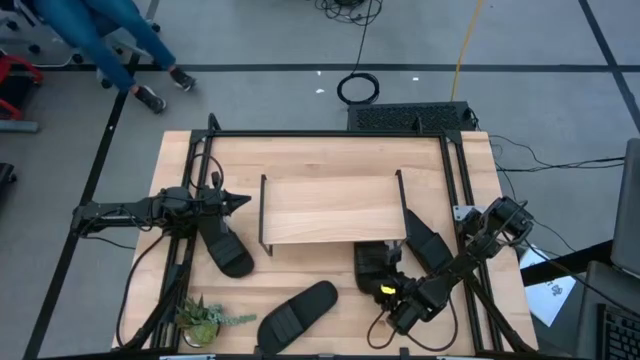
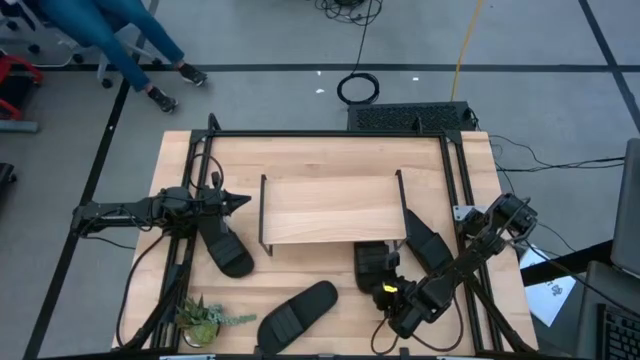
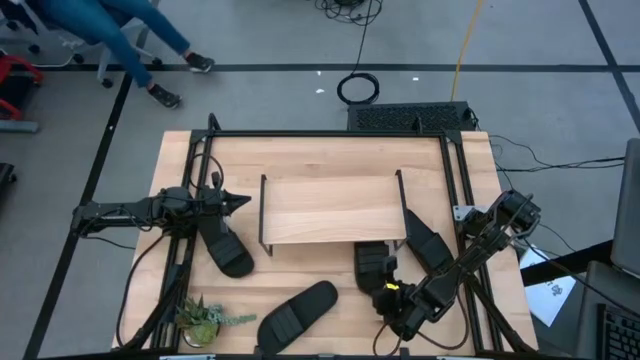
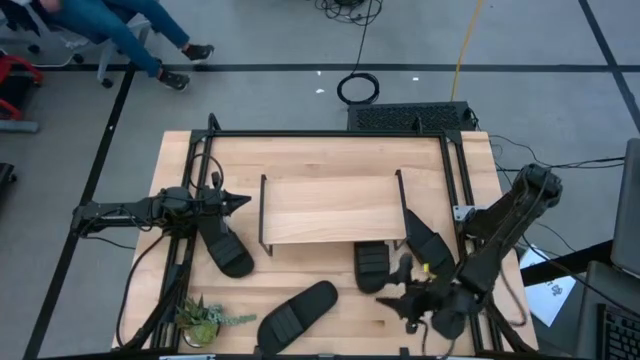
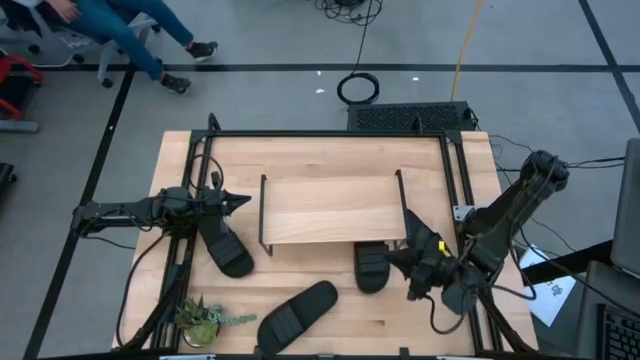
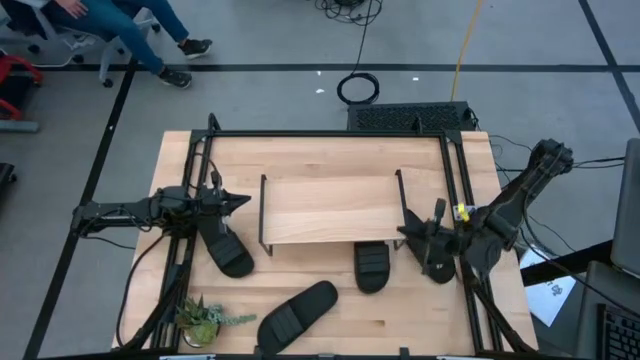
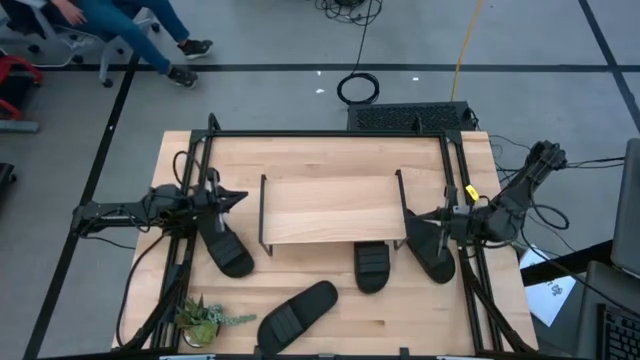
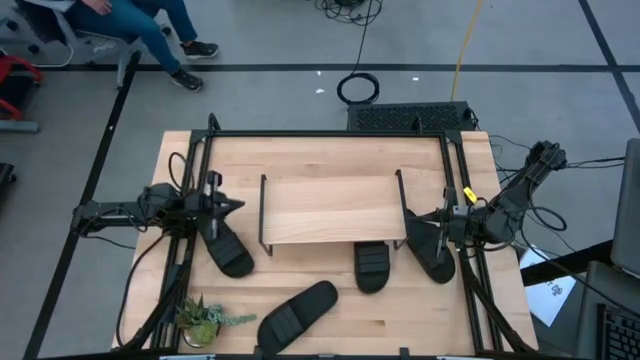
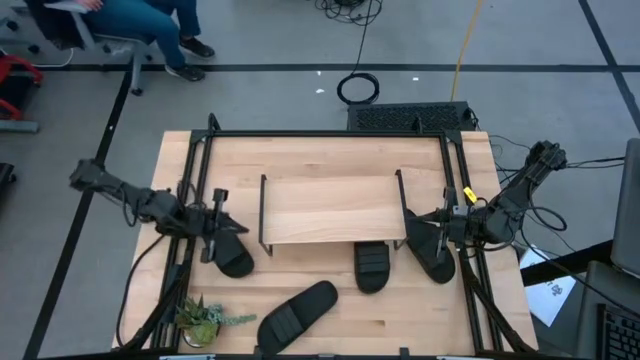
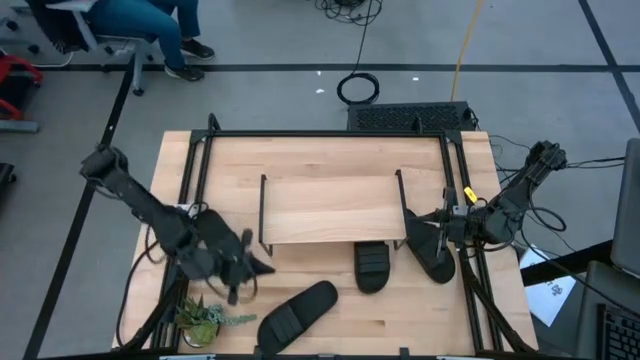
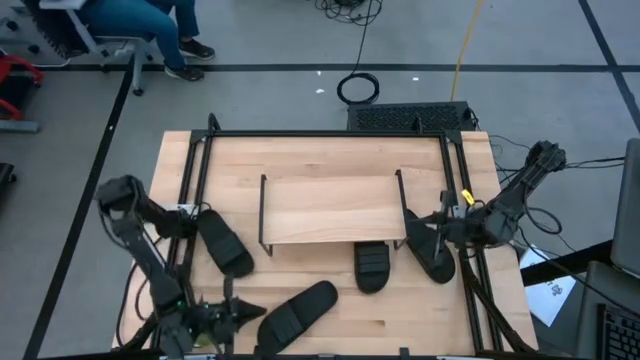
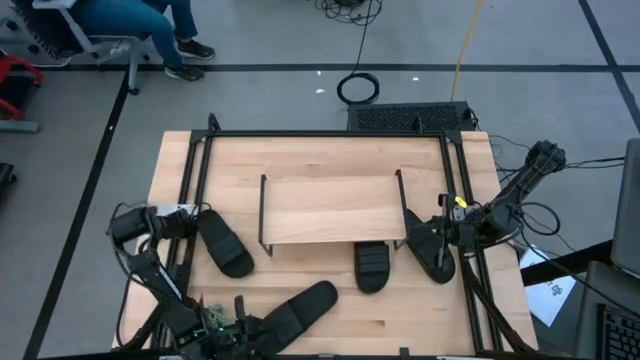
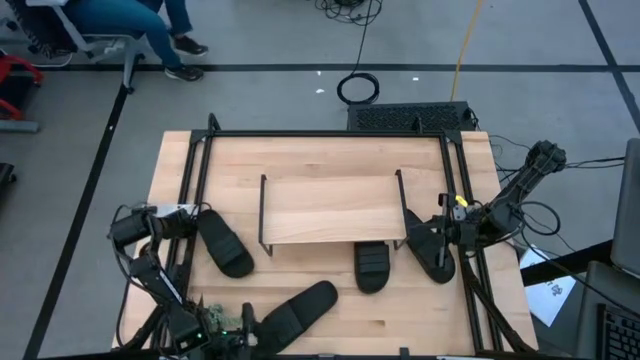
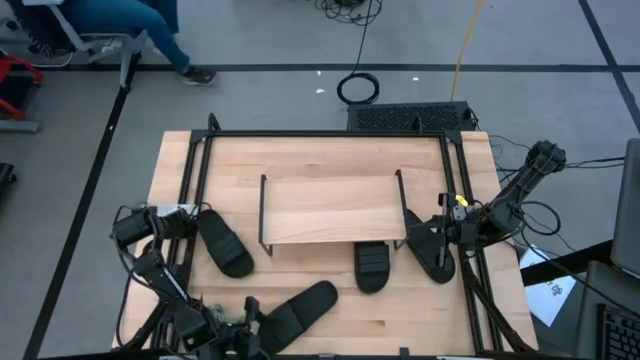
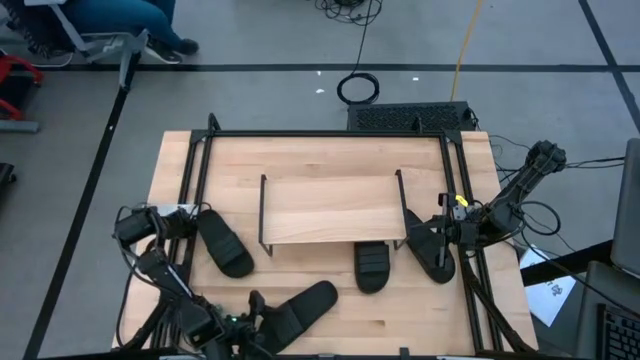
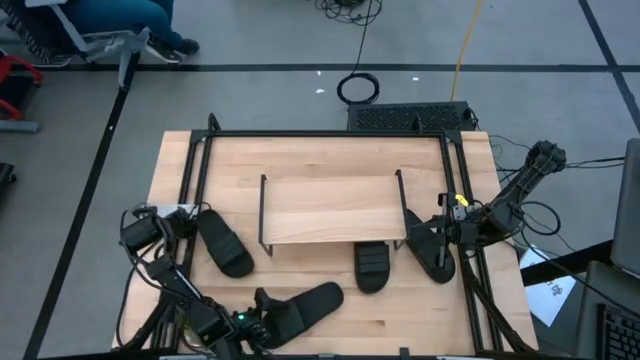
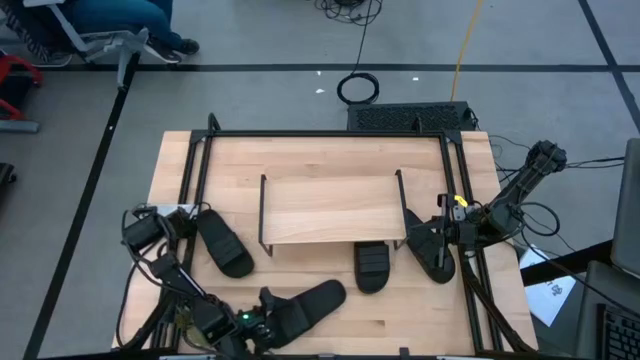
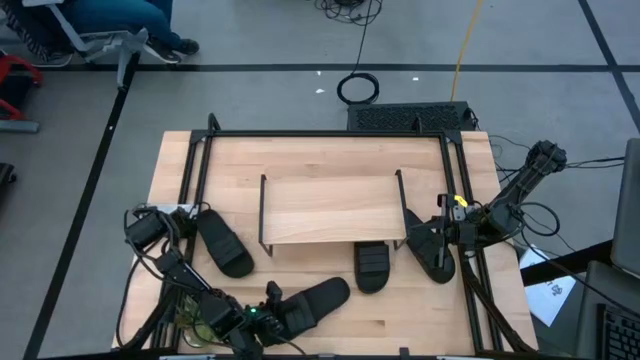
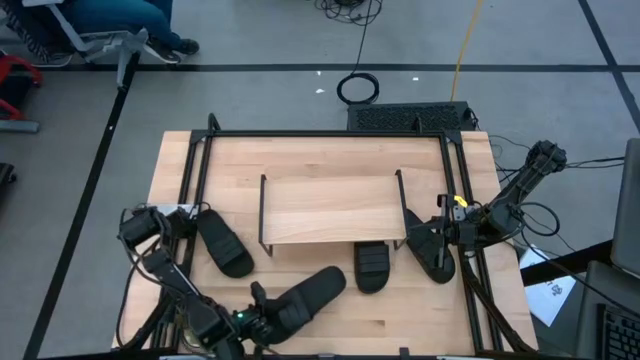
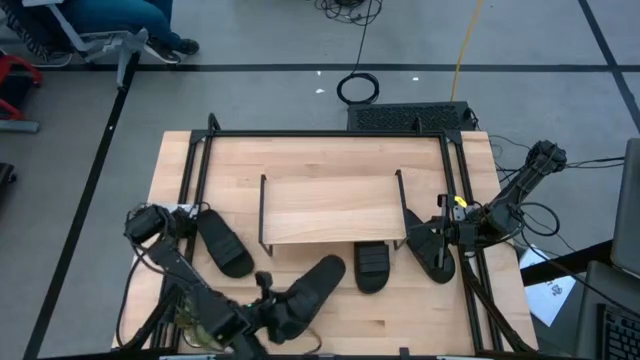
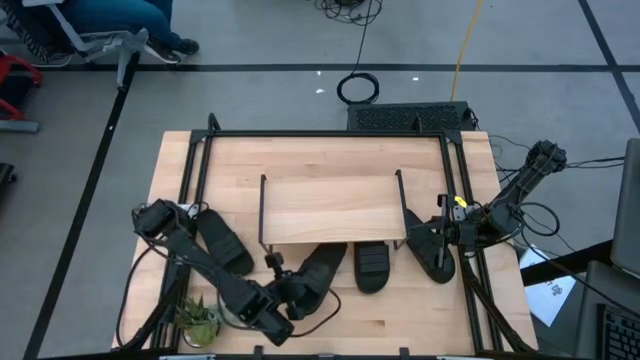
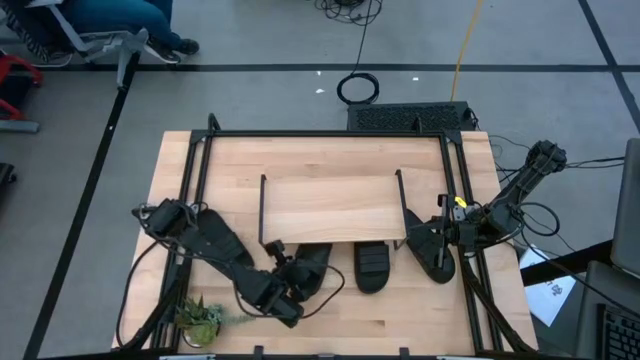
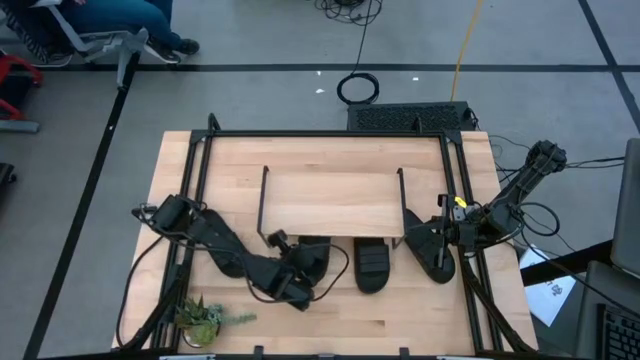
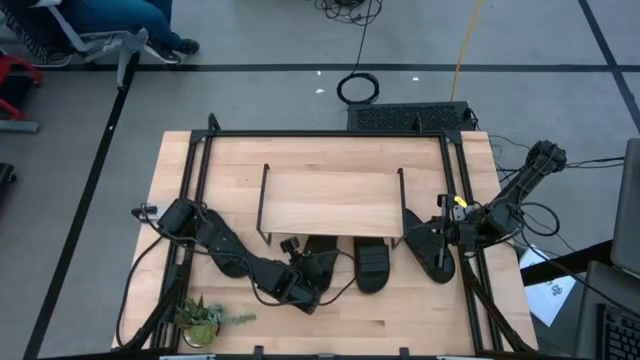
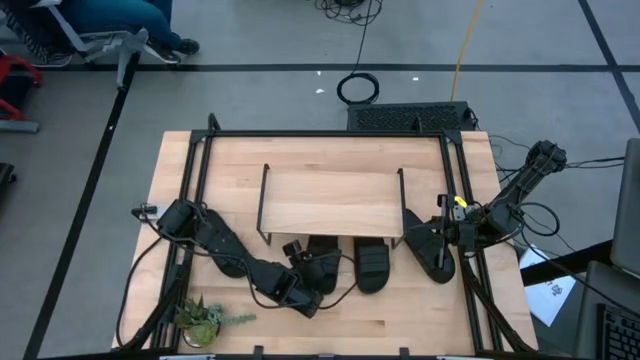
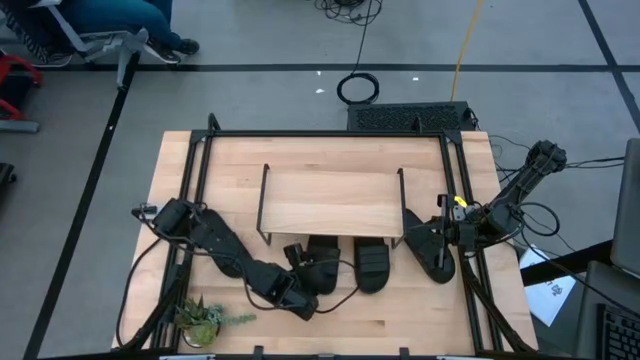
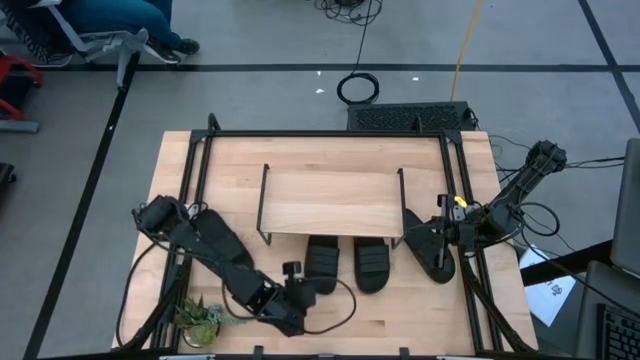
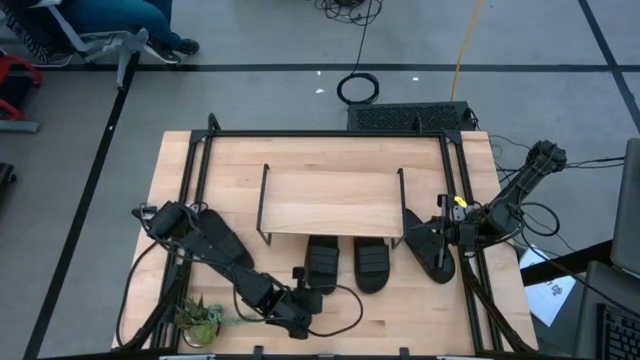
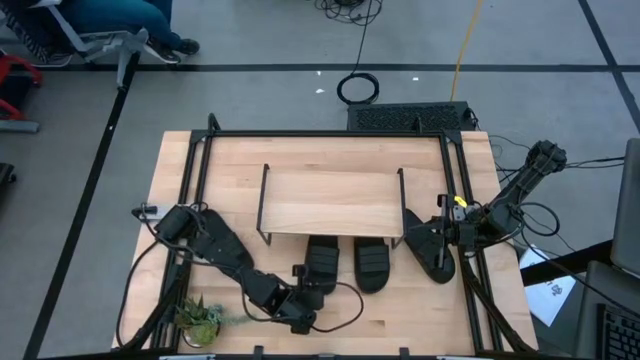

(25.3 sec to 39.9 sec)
Task: Pick and place slides into the shelf
Put the bottom left black slipper align with the right black slipper under the shelf

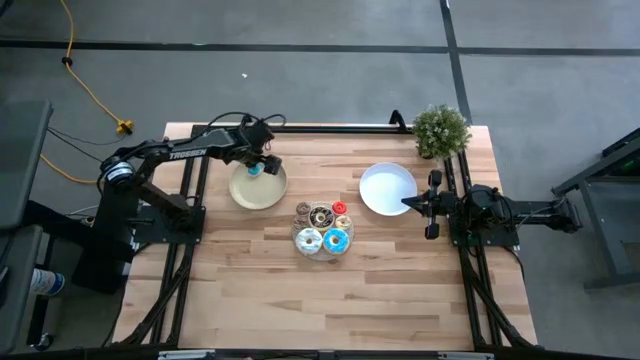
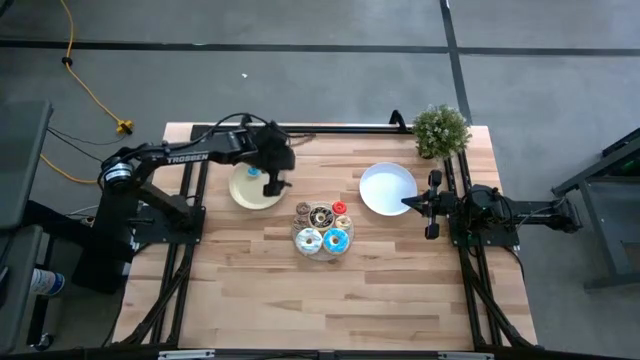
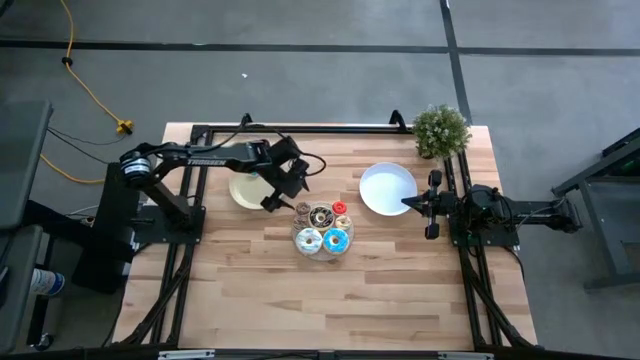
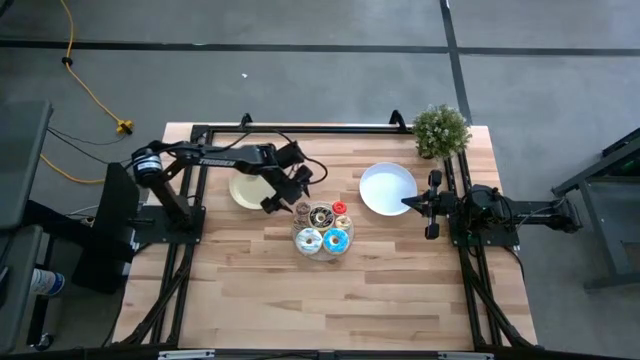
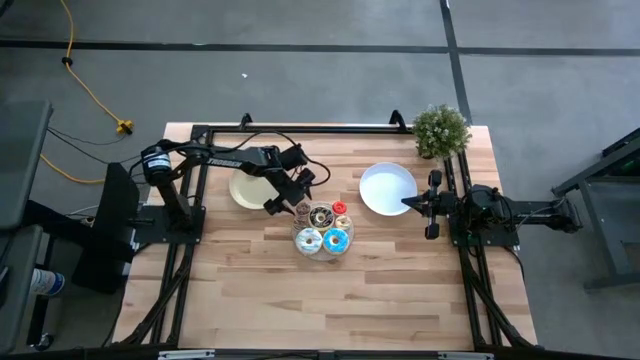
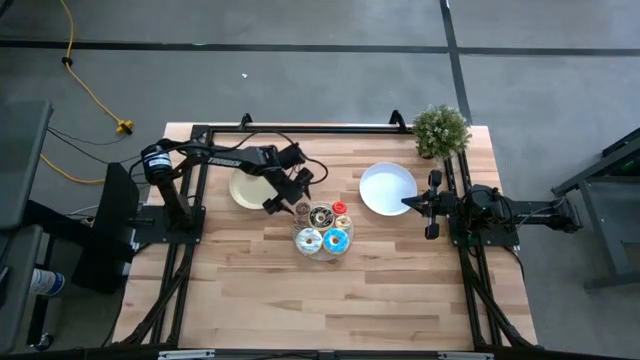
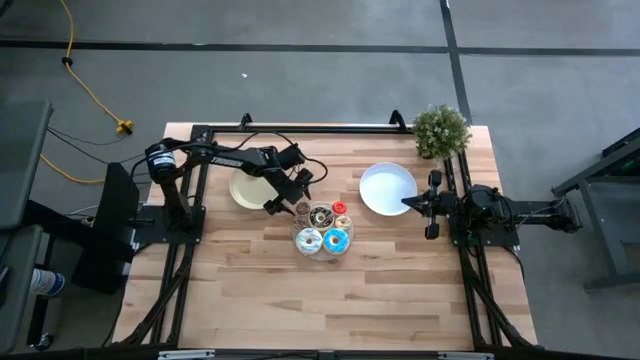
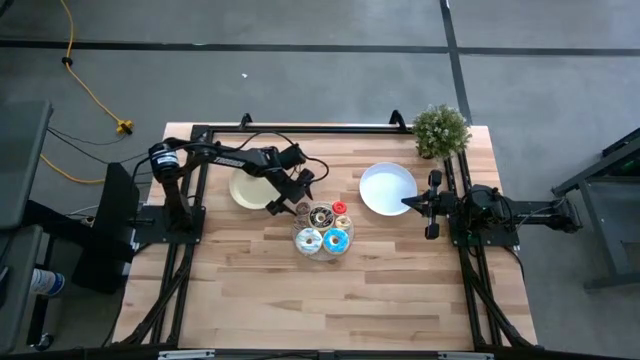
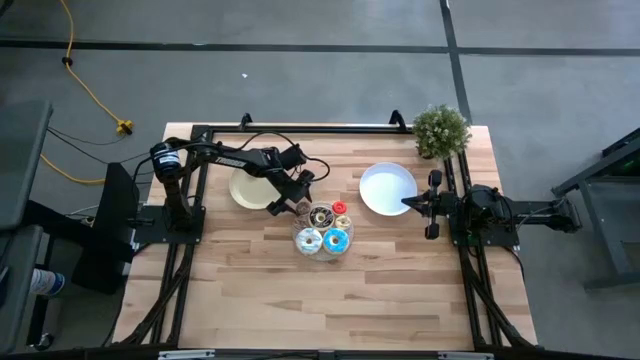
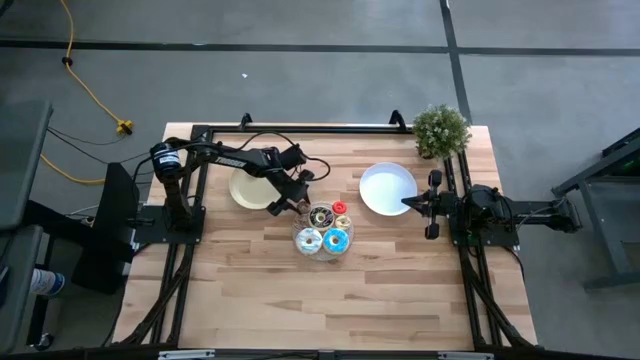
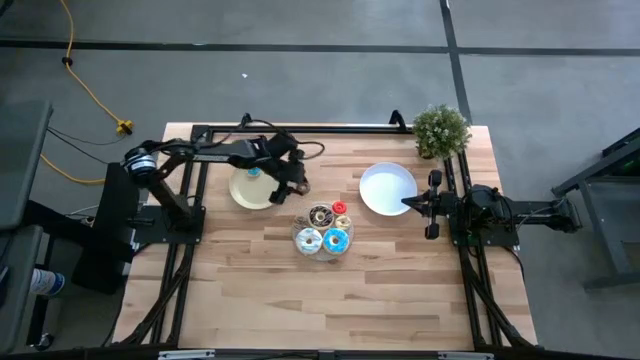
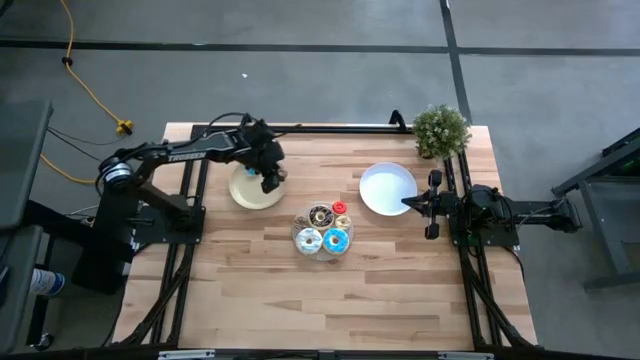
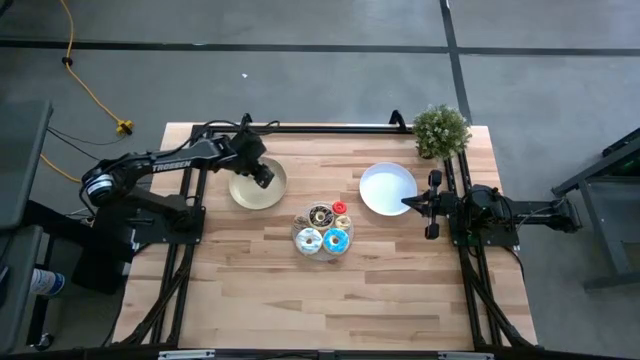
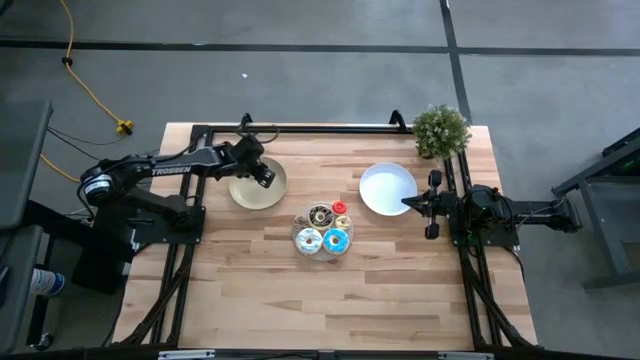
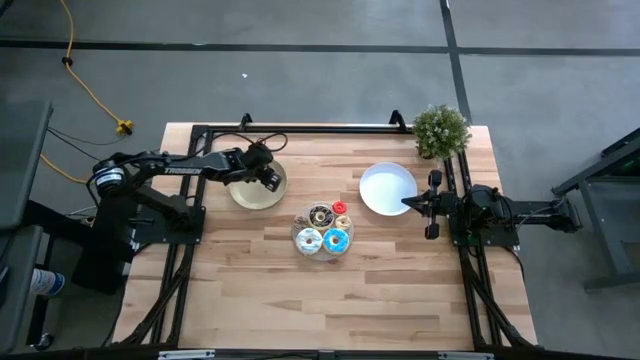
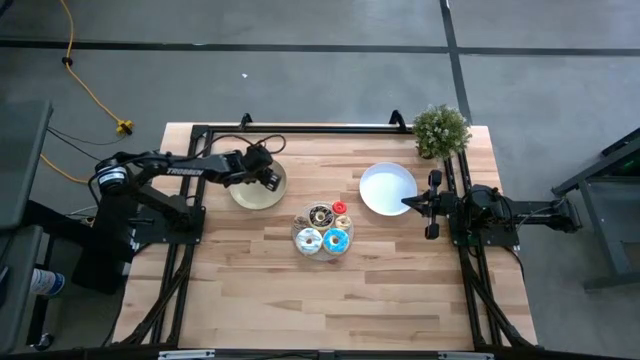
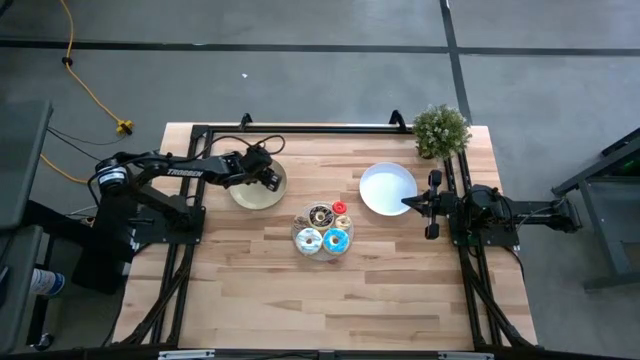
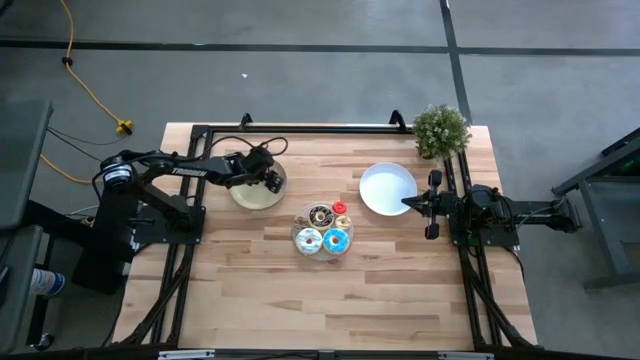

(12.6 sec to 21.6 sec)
Task: Pick & Place donuts
Put the top small brown donut on the brown plate
